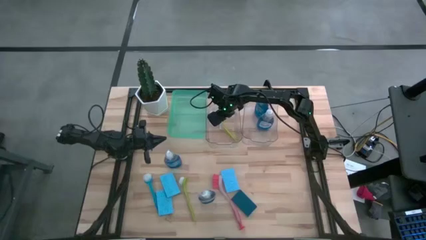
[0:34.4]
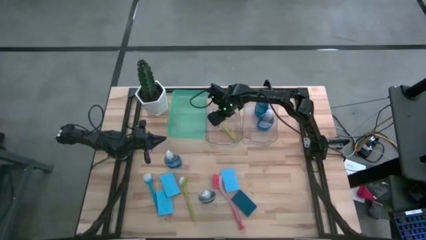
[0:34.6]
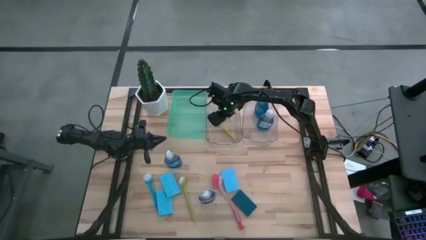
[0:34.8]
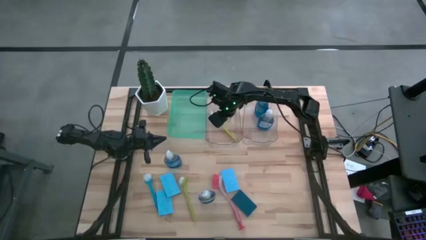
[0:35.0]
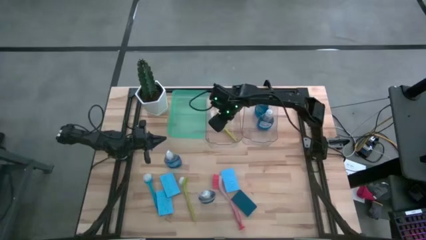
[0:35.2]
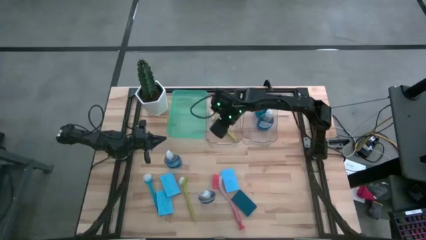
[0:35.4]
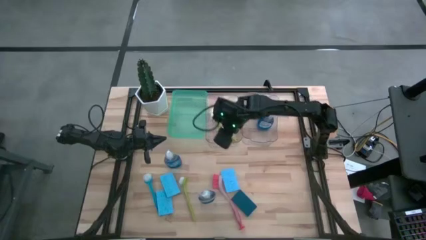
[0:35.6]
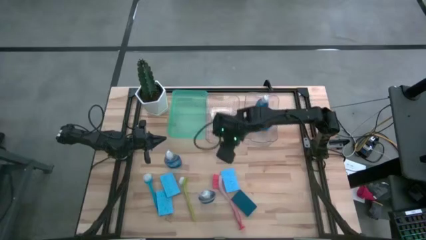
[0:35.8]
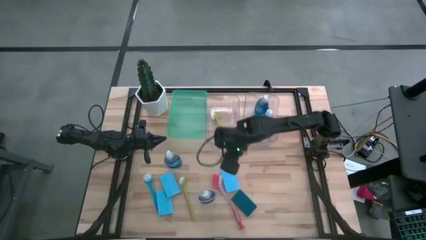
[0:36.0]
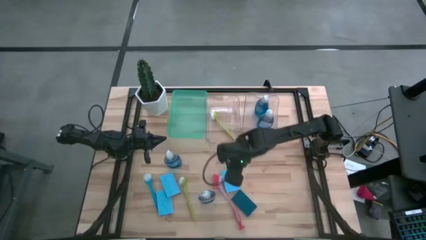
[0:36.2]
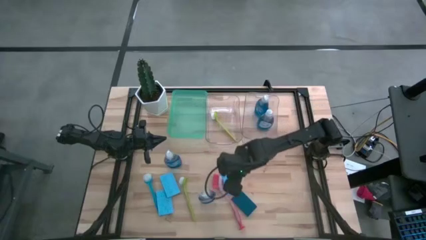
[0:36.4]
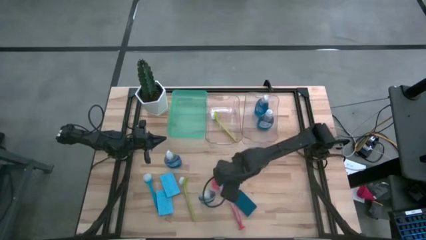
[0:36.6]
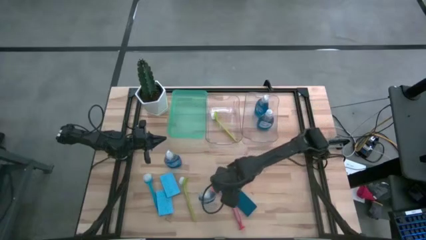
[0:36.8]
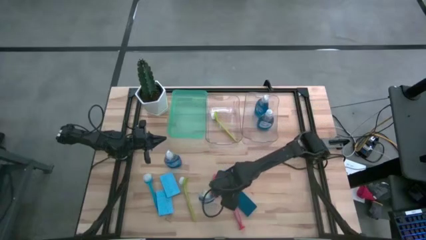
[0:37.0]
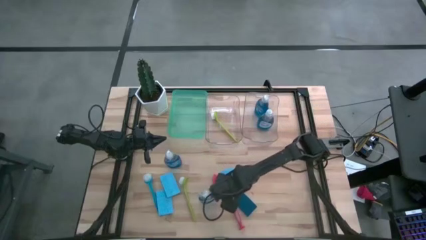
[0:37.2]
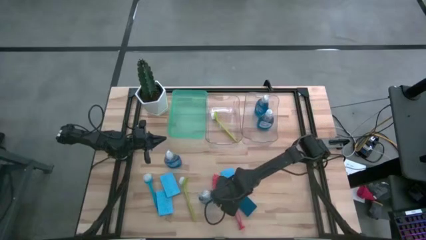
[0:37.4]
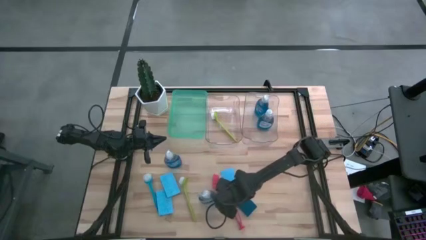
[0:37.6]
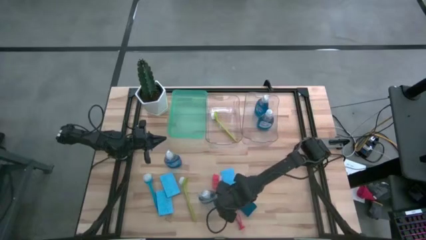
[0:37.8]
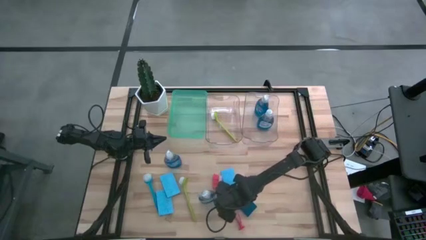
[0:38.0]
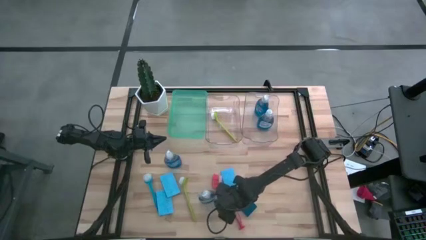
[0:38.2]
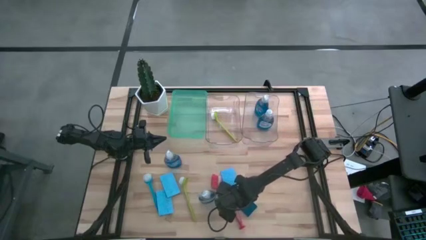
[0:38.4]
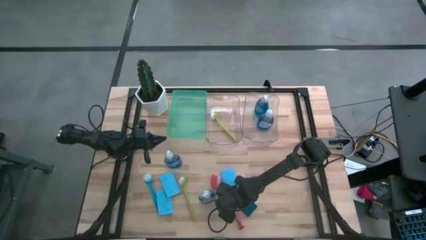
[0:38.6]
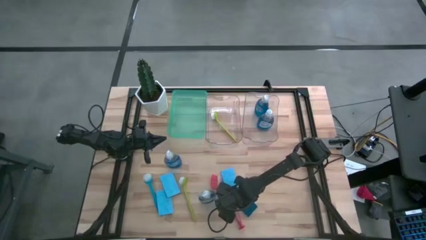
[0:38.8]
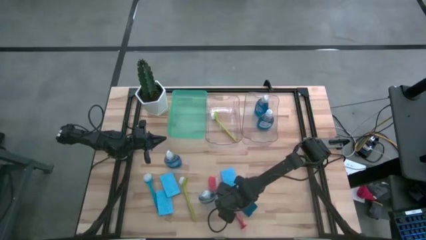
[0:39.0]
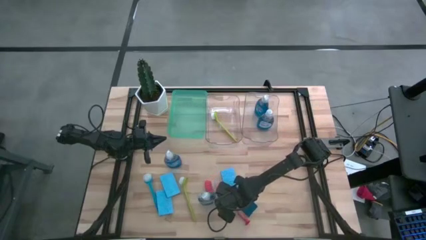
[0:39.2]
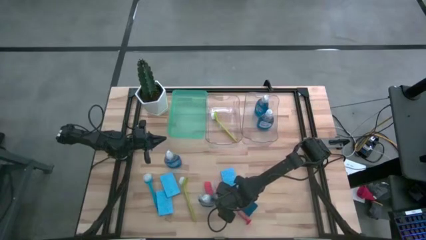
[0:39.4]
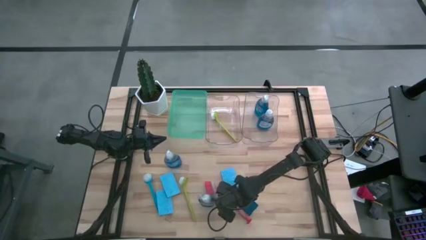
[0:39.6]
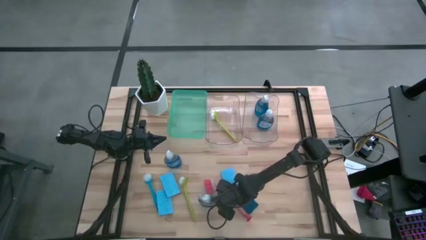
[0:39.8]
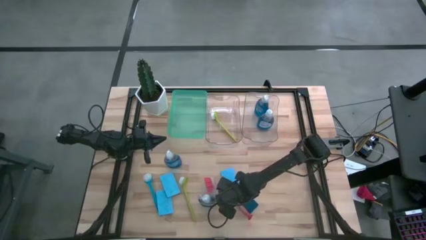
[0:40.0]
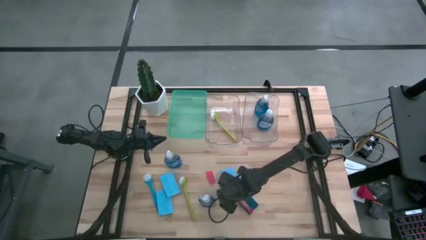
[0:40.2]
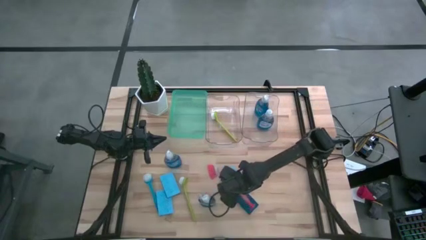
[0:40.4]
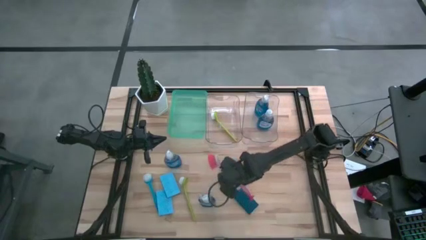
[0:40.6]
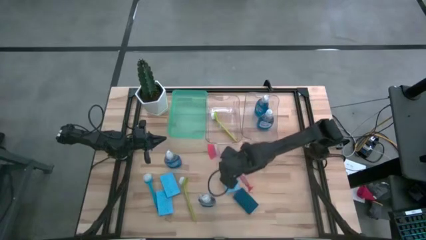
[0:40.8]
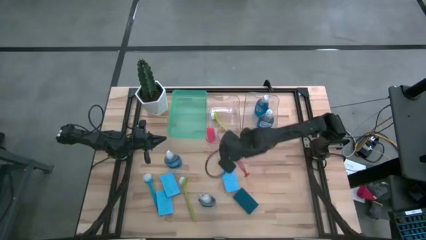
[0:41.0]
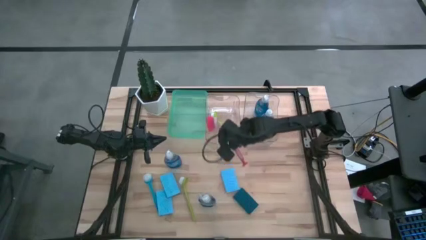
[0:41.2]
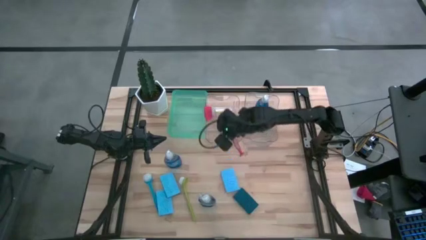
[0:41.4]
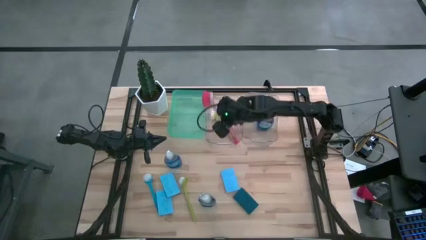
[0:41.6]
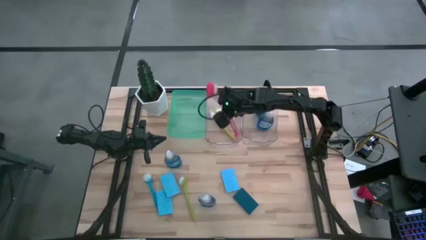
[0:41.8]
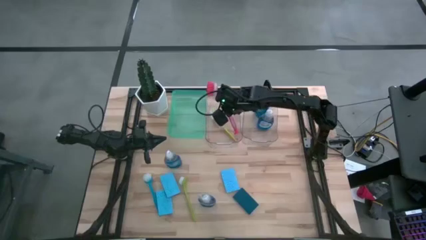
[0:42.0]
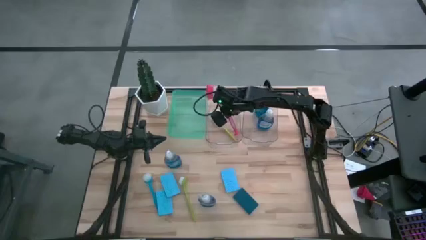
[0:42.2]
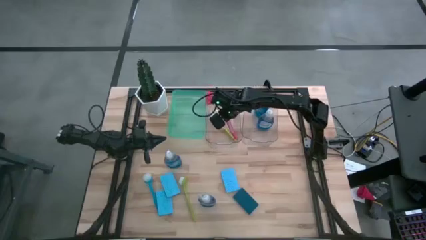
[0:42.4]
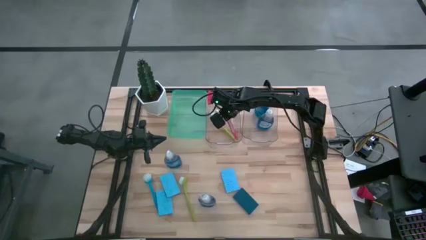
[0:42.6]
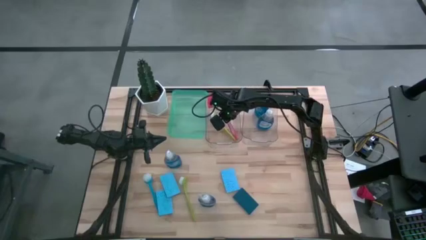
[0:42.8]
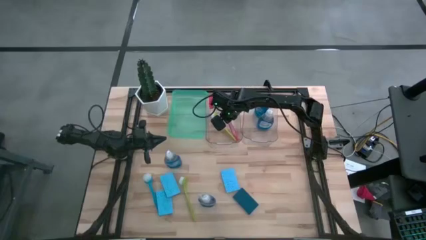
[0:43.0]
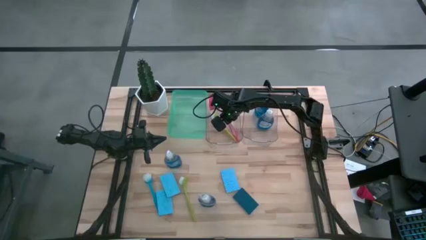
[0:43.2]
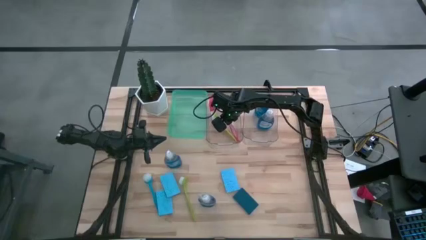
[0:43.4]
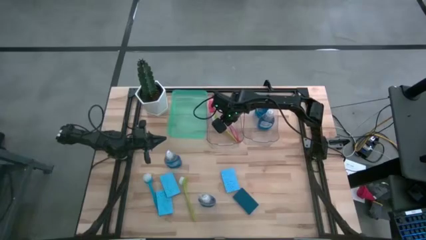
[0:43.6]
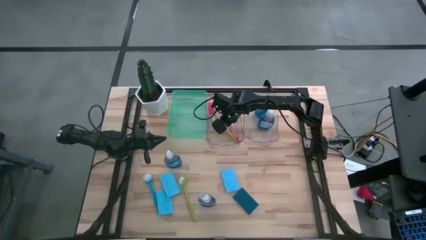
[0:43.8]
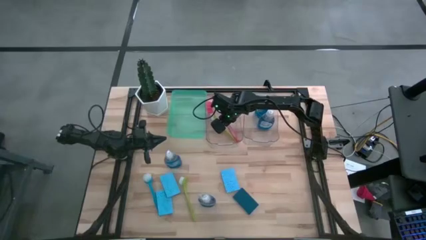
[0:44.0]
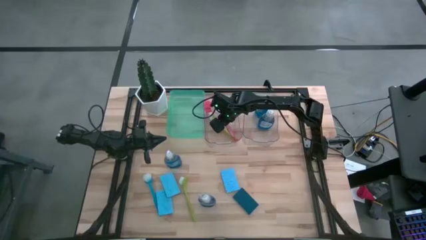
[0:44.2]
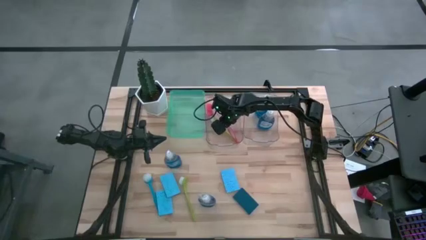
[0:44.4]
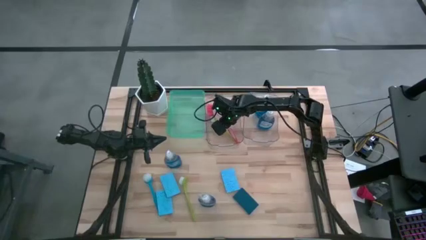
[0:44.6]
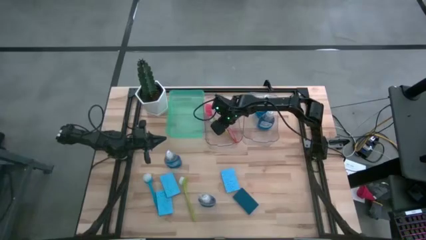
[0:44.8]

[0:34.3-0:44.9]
Task: Pick & Place Kitchen Sink Supplies
Put the orange dish brush into the left transparent bin
